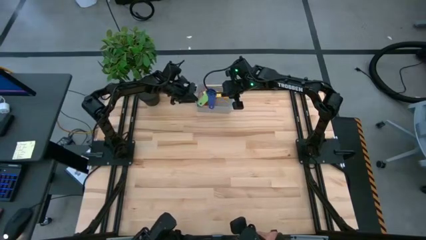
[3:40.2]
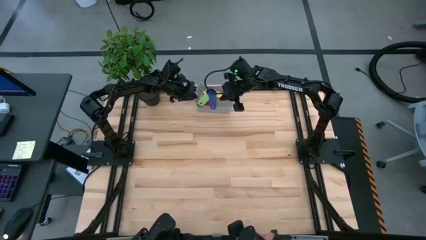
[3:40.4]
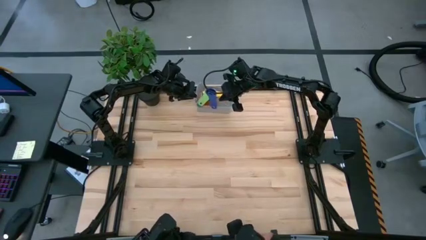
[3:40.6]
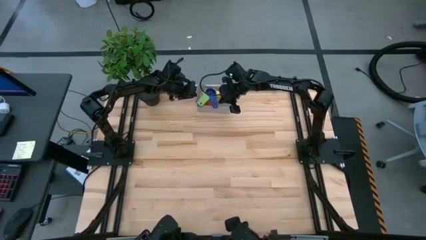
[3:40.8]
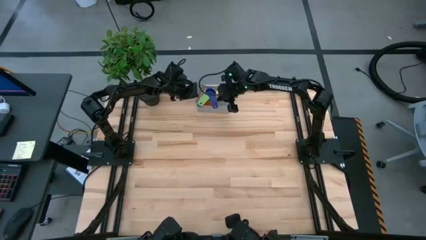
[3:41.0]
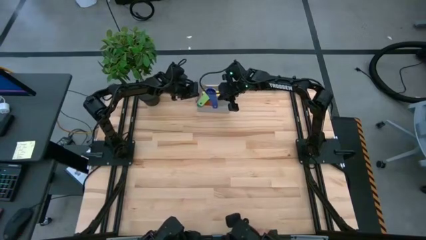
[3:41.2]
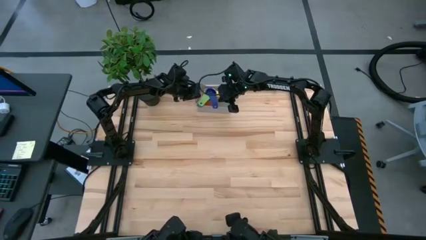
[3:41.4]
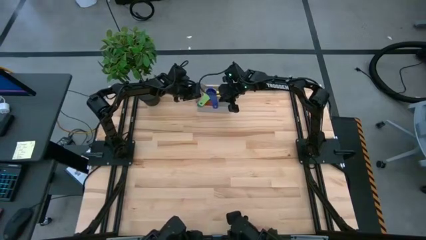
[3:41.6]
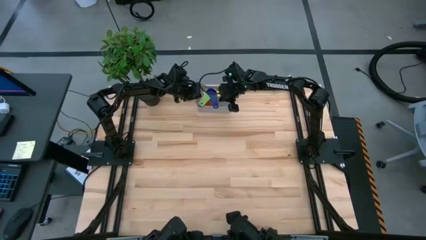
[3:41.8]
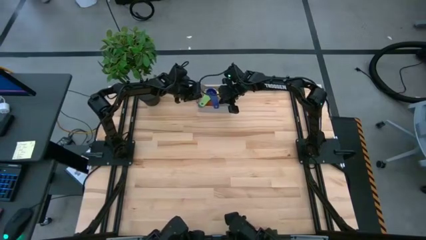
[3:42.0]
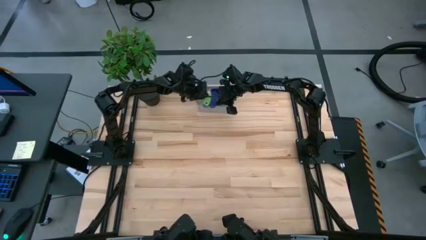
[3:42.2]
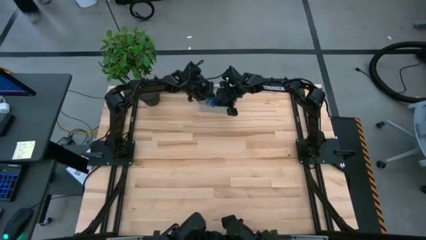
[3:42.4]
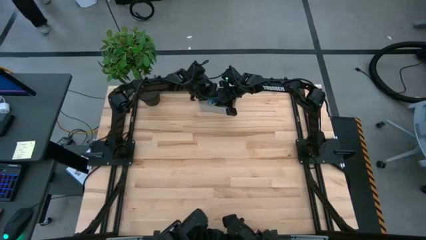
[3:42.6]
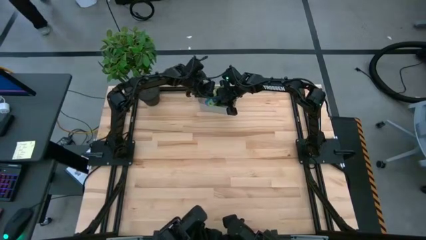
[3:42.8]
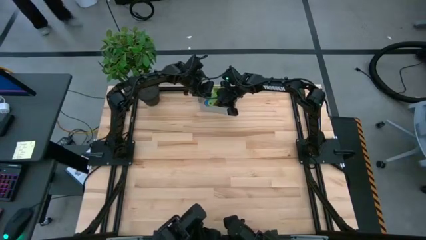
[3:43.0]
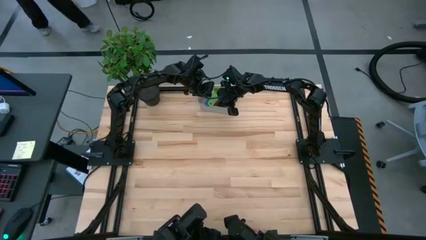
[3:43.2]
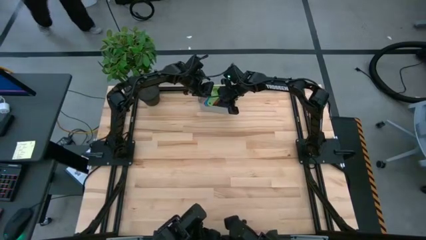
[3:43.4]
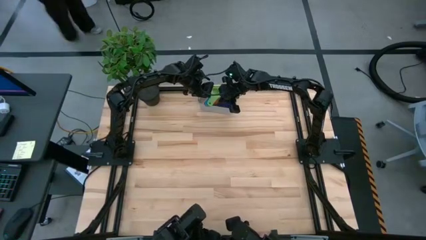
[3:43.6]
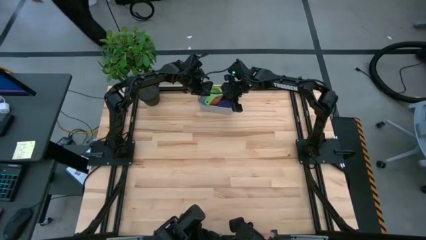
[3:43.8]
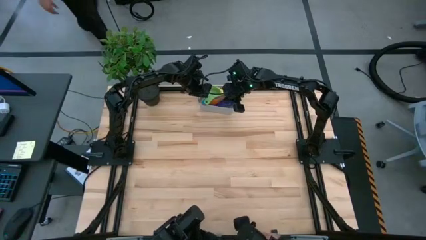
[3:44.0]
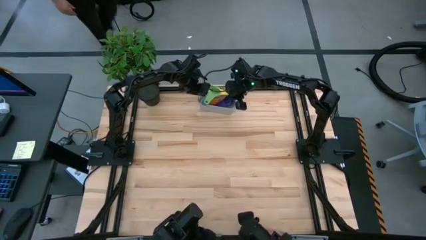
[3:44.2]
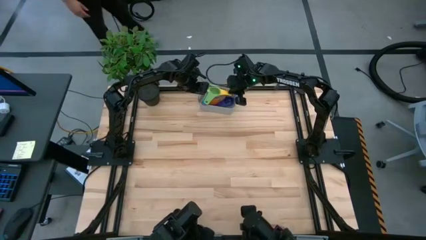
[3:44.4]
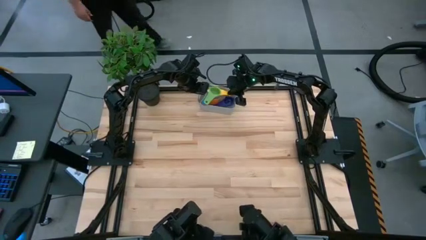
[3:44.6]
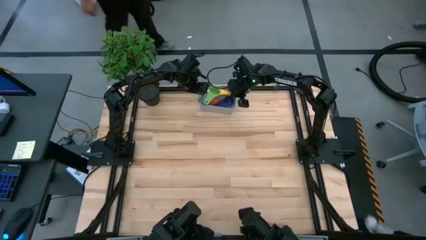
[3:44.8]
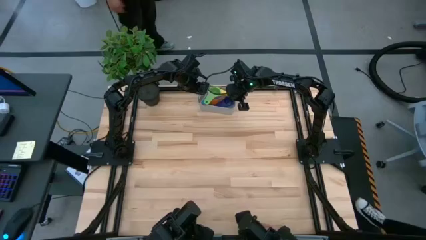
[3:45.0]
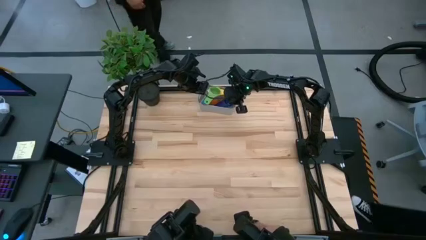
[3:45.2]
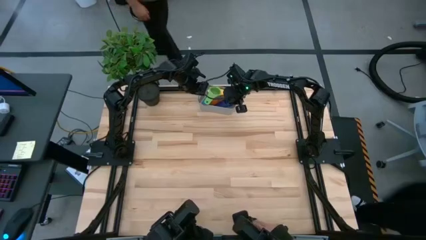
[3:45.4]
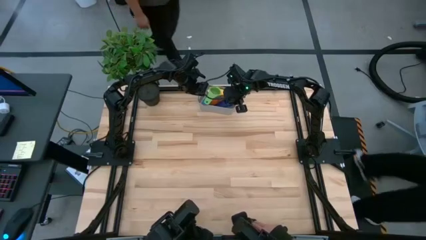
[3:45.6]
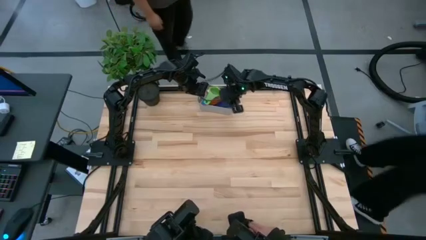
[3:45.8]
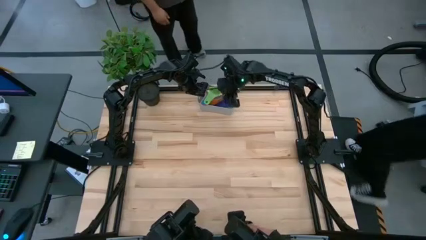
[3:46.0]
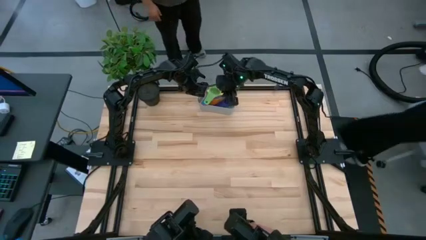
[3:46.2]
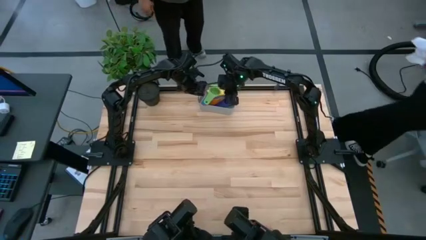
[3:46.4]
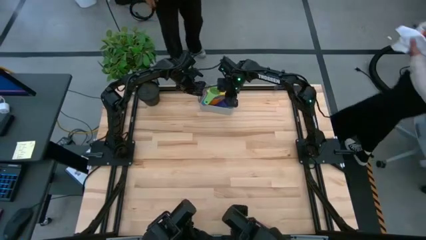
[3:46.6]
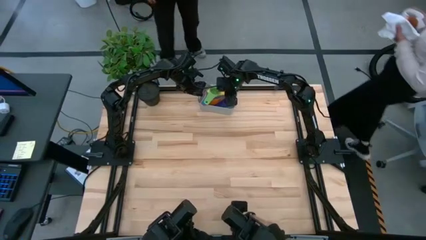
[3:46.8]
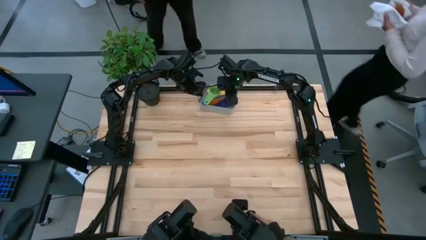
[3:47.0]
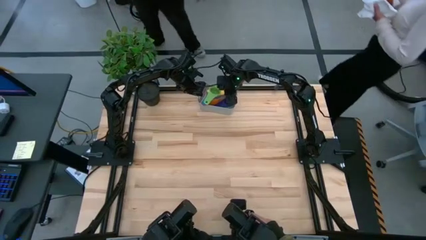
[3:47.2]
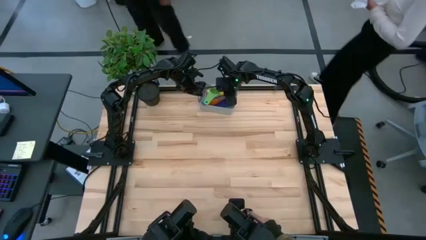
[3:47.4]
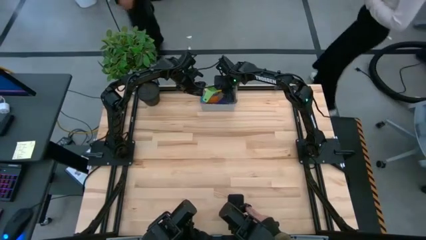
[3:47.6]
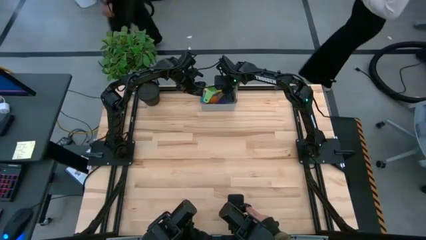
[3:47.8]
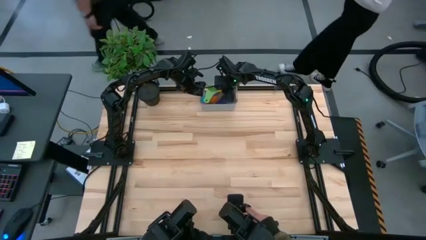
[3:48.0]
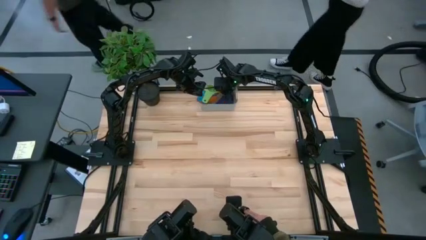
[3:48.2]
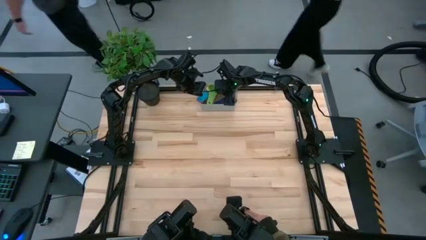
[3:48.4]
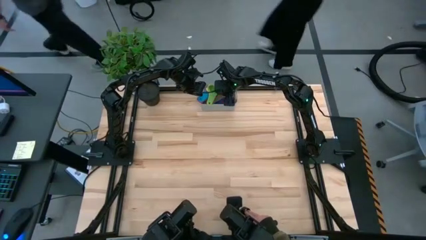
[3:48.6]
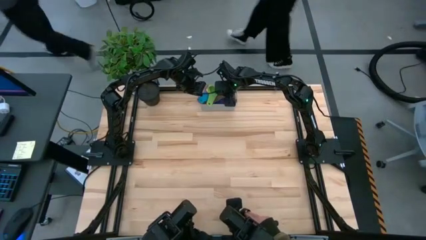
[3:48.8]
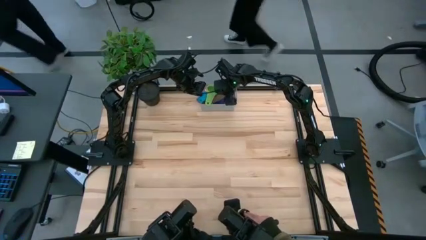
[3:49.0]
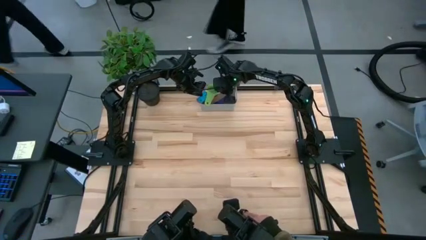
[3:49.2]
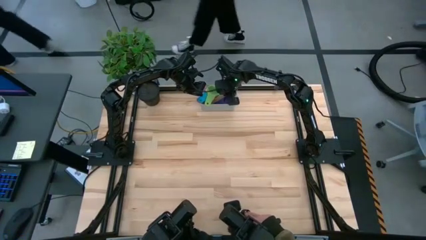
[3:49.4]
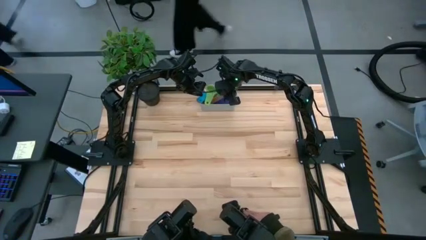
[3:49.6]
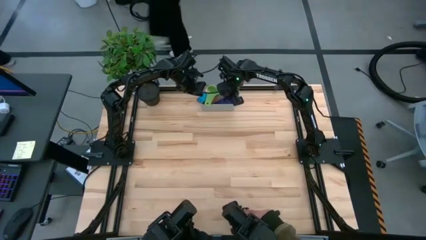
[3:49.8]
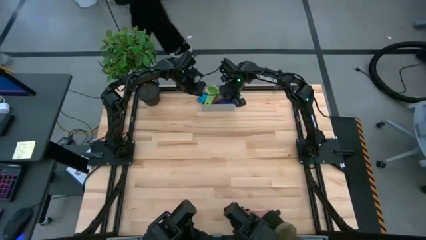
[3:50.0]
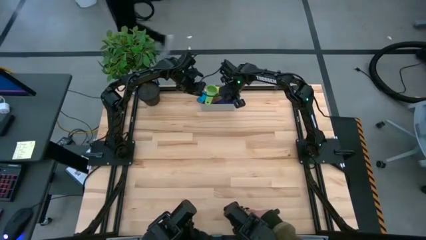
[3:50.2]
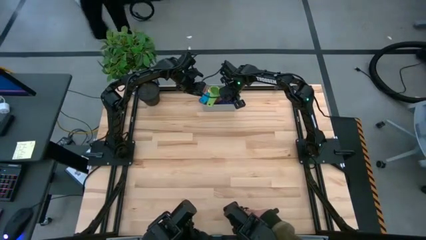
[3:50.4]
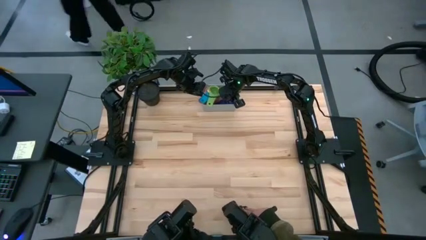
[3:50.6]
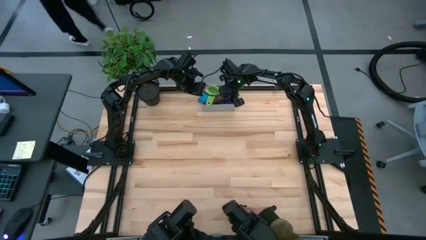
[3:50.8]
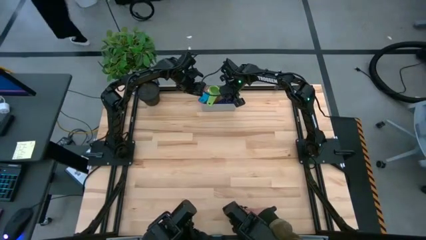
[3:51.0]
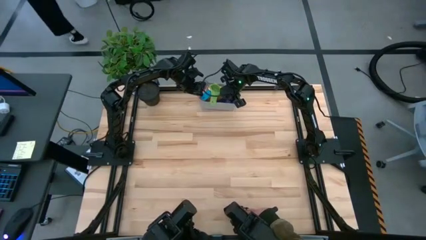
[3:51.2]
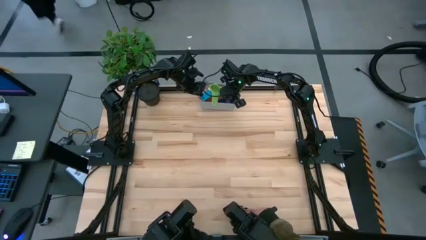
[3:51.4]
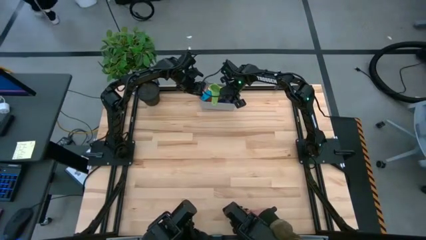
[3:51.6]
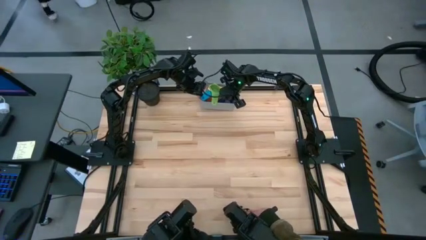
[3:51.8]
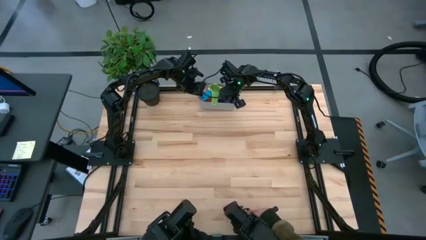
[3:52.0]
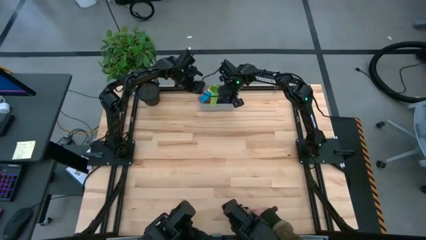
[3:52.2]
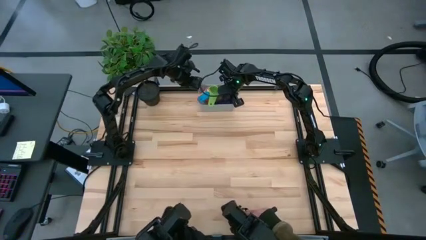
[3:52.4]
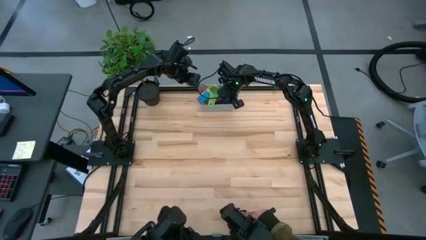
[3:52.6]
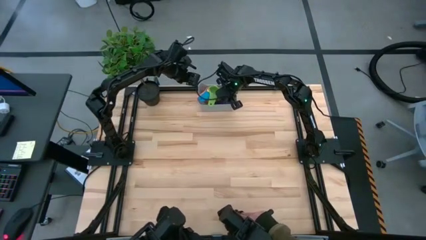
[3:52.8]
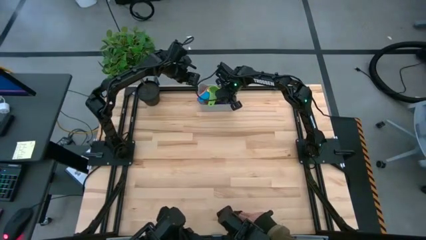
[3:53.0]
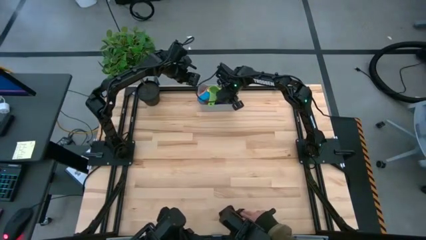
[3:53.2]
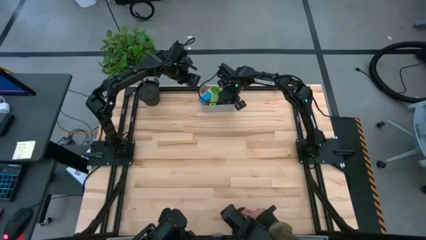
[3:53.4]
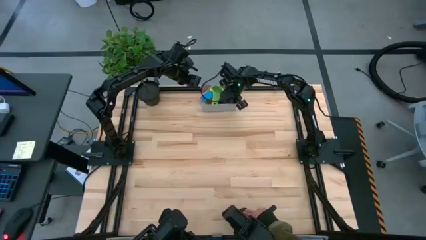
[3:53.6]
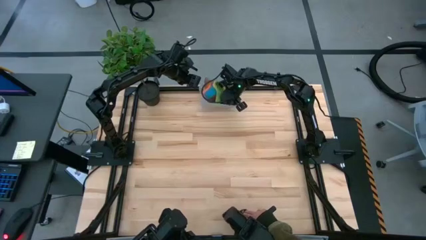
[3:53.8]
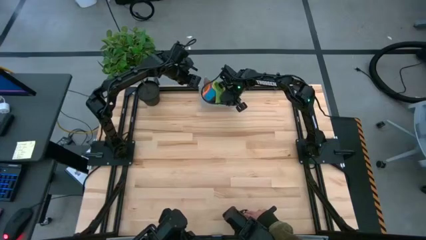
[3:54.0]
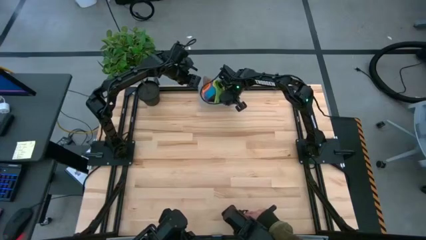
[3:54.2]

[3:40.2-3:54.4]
Task: Nest measuring cups in basket
Adjust the stacked measuring cups in the gray bin

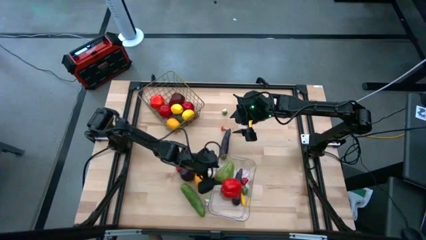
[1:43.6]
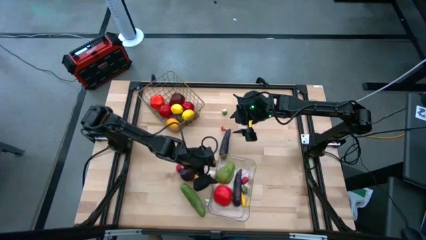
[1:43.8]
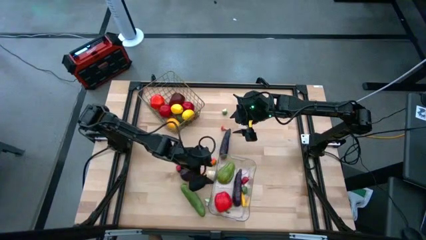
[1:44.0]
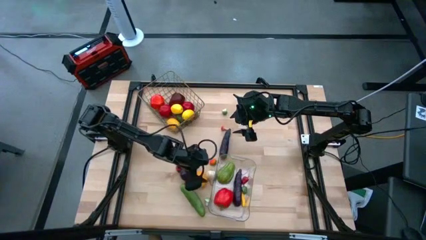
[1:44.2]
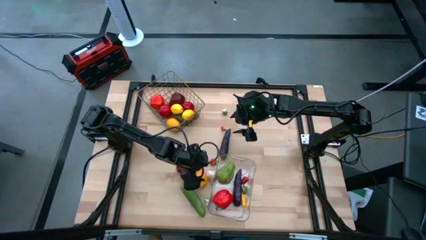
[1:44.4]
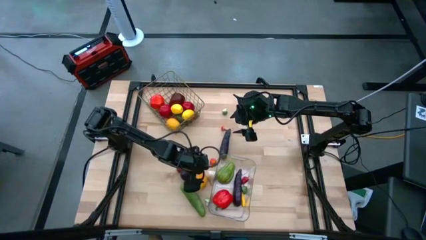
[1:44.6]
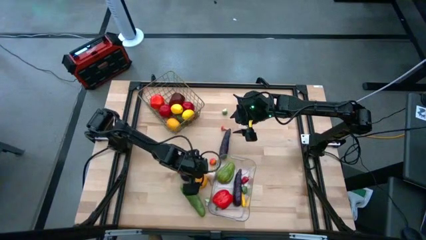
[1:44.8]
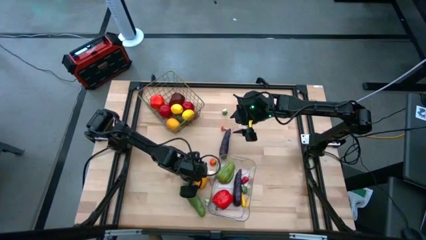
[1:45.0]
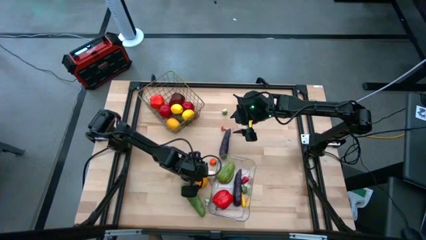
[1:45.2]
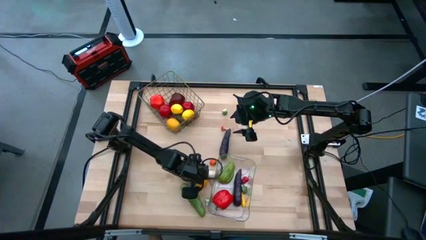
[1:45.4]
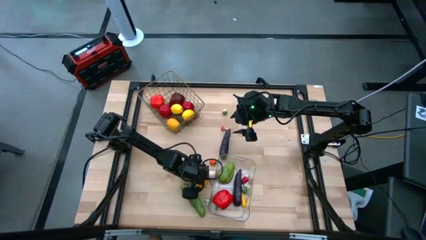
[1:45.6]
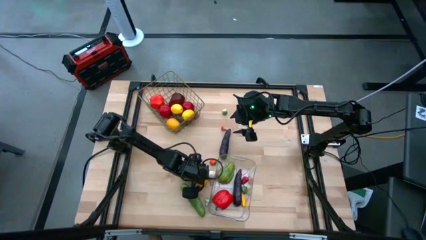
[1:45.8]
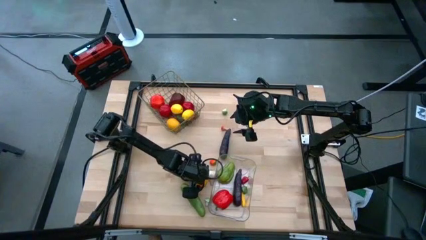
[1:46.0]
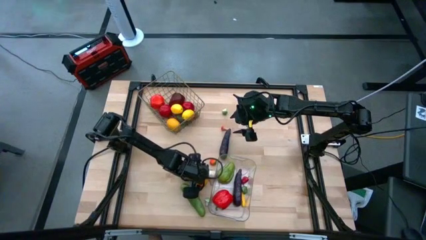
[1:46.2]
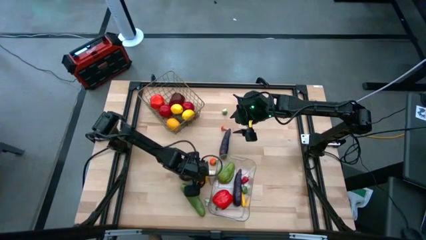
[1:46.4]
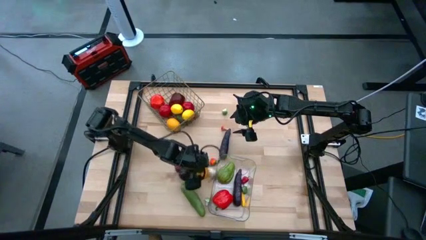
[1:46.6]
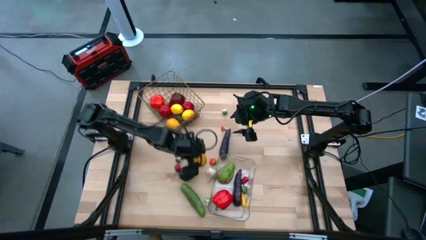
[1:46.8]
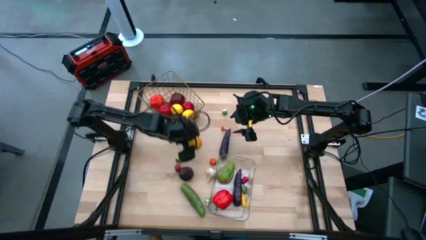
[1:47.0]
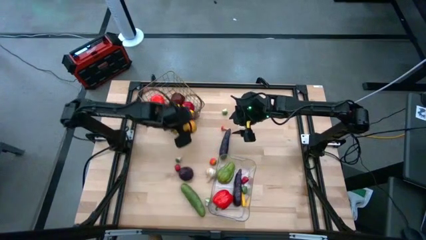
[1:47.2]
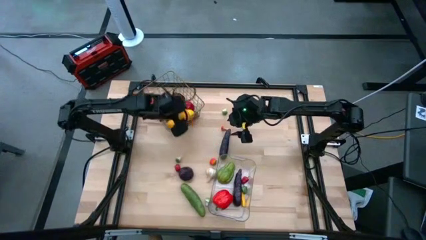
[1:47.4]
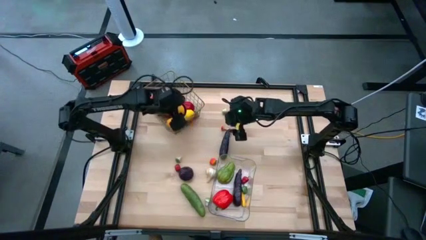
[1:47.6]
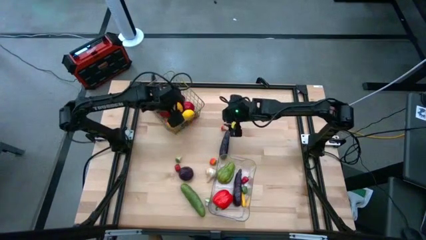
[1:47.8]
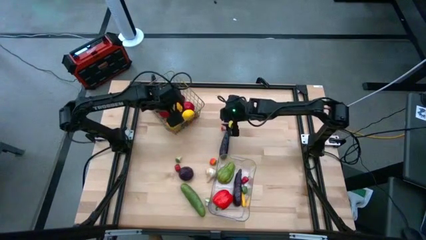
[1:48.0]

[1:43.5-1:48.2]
Task: Sort produce into baskets
Put the yellow lemon into the wire basket
